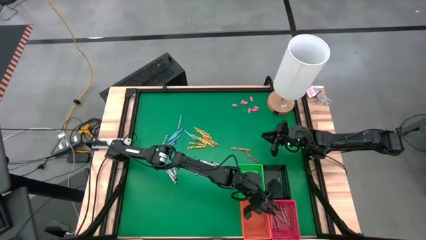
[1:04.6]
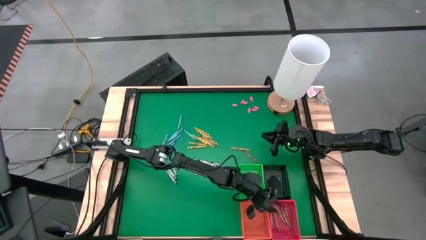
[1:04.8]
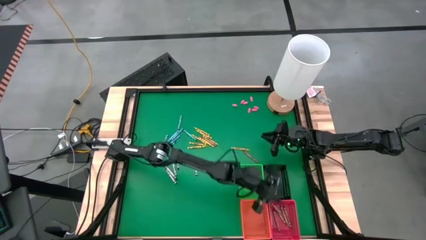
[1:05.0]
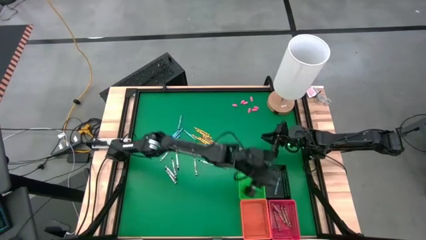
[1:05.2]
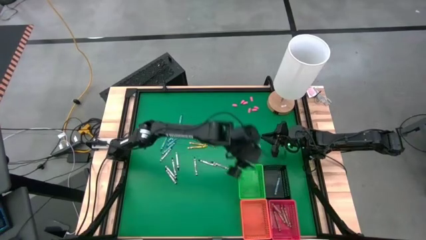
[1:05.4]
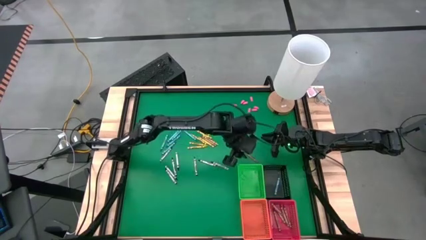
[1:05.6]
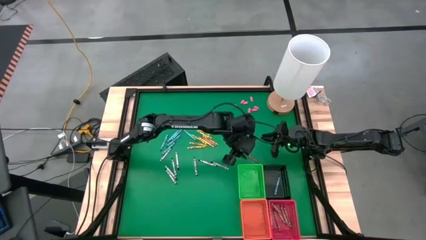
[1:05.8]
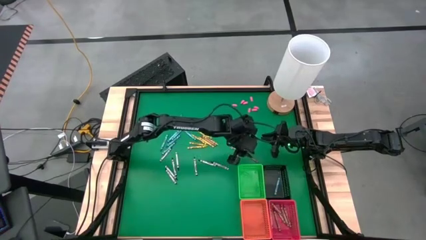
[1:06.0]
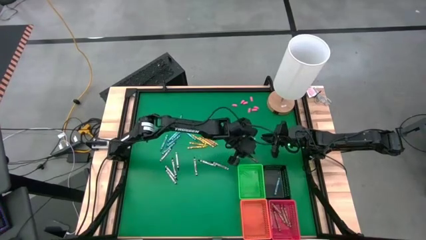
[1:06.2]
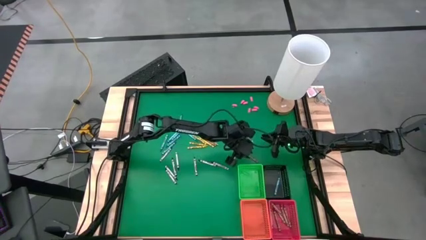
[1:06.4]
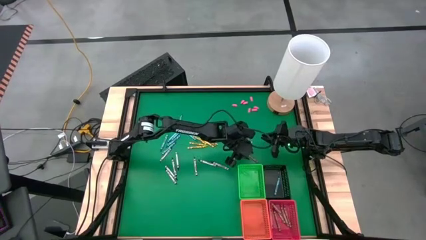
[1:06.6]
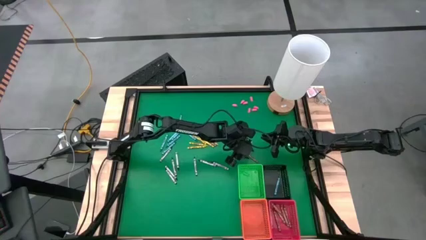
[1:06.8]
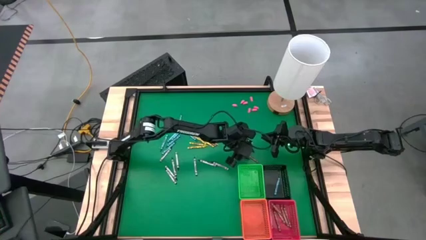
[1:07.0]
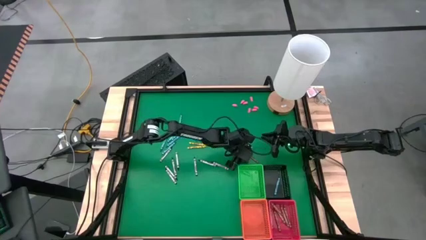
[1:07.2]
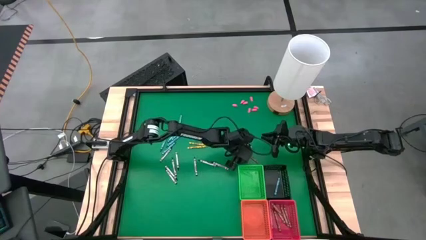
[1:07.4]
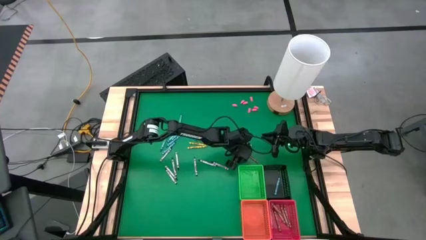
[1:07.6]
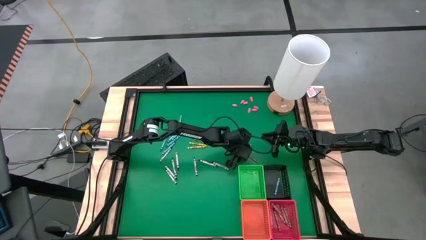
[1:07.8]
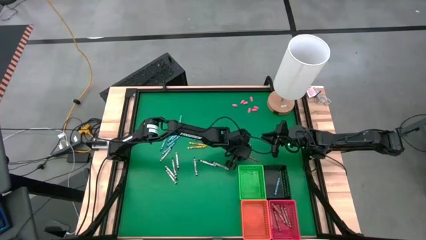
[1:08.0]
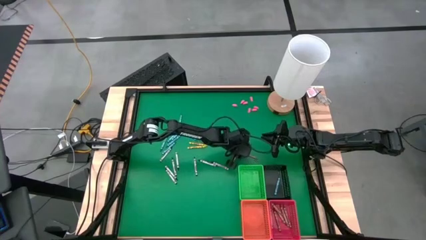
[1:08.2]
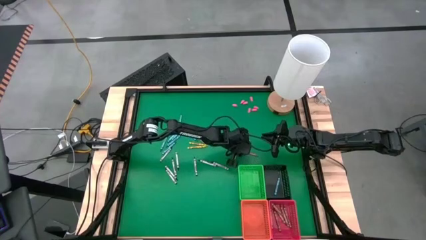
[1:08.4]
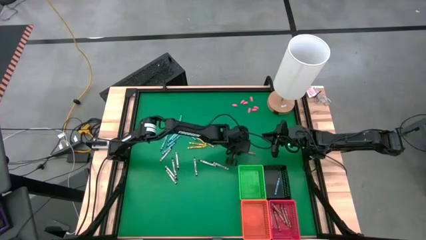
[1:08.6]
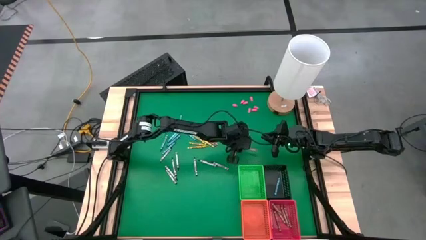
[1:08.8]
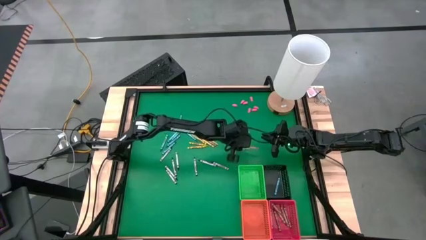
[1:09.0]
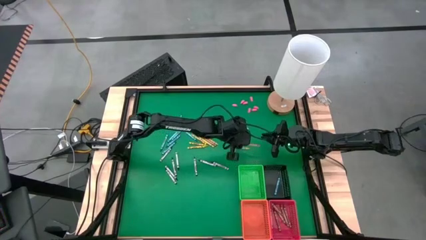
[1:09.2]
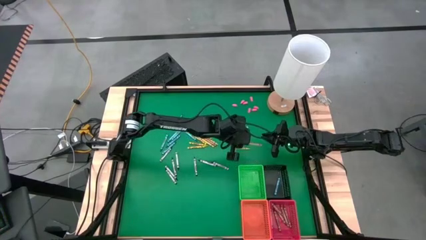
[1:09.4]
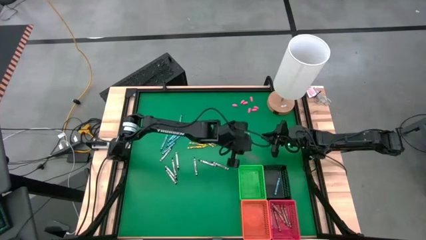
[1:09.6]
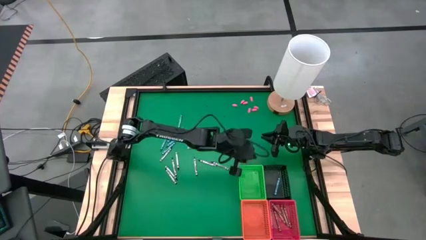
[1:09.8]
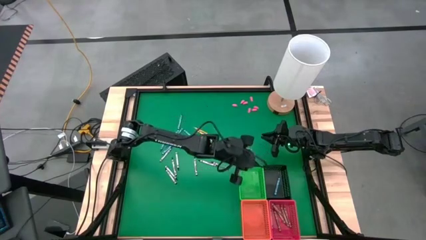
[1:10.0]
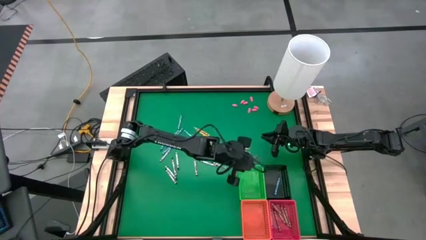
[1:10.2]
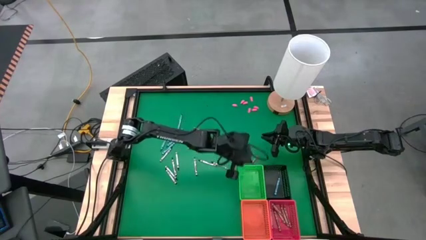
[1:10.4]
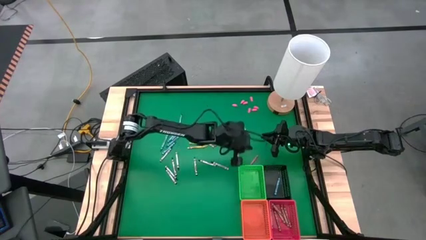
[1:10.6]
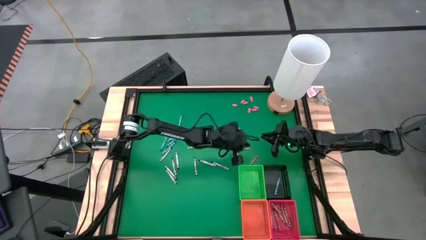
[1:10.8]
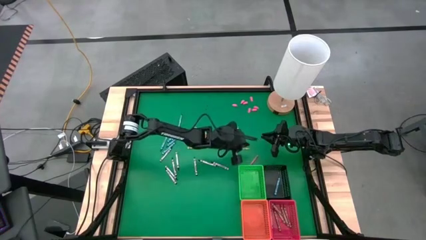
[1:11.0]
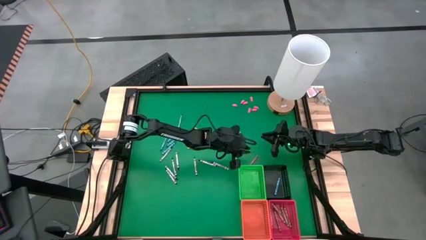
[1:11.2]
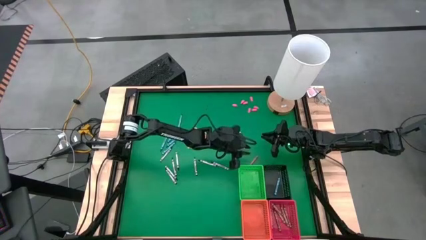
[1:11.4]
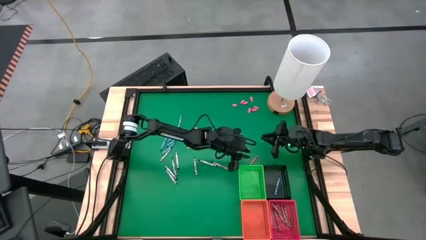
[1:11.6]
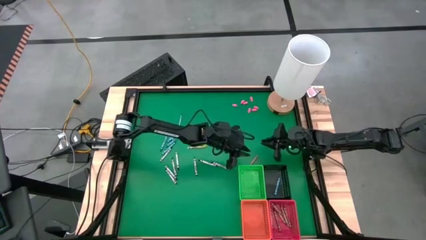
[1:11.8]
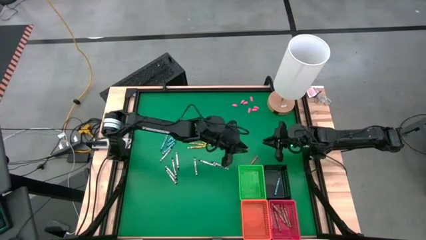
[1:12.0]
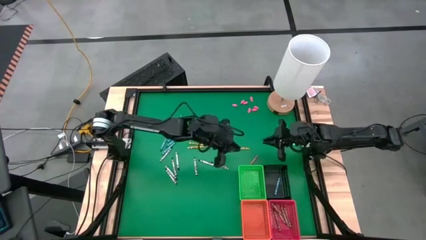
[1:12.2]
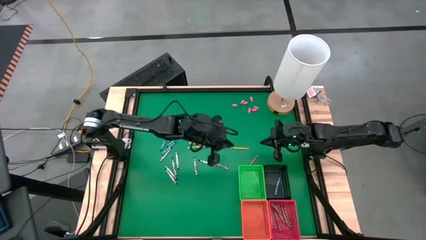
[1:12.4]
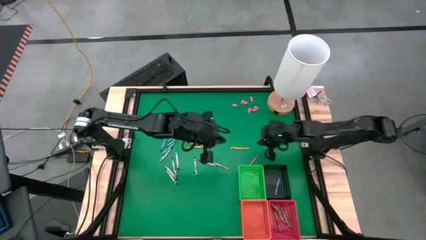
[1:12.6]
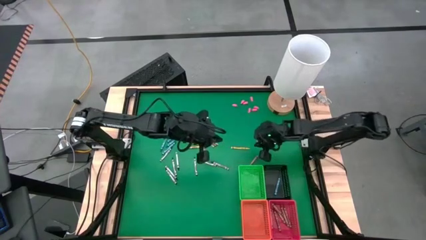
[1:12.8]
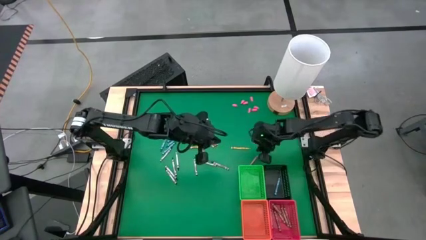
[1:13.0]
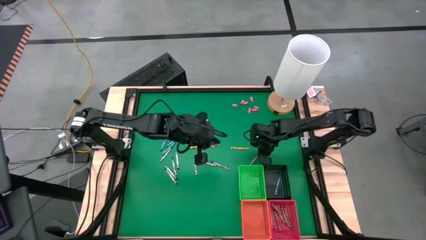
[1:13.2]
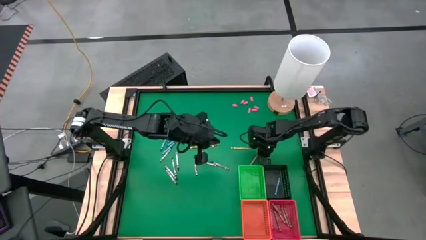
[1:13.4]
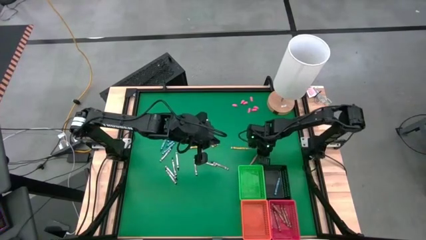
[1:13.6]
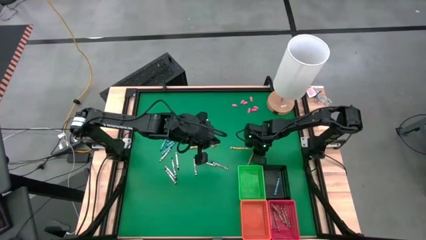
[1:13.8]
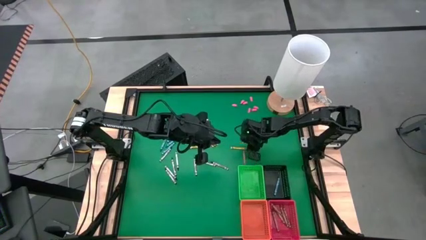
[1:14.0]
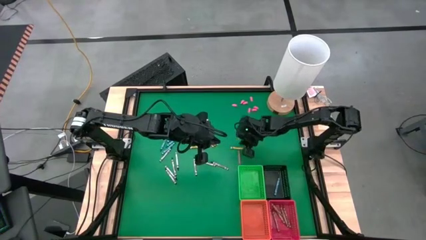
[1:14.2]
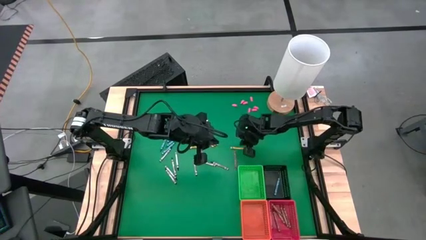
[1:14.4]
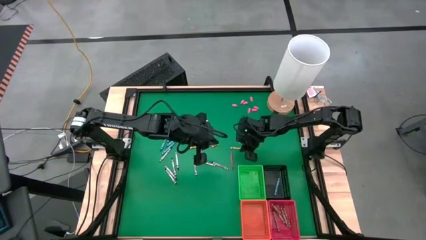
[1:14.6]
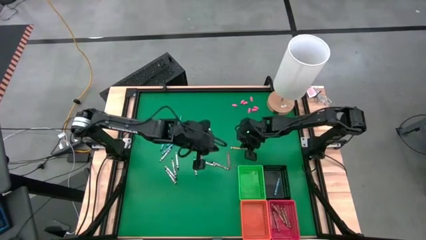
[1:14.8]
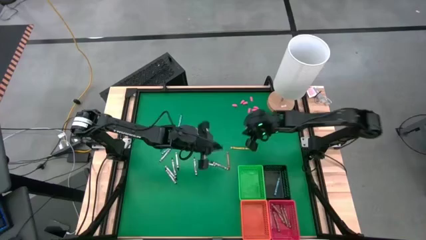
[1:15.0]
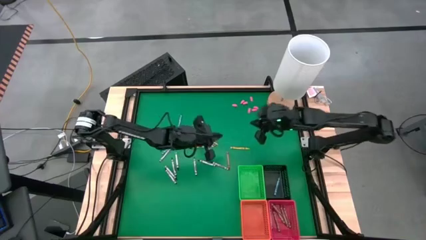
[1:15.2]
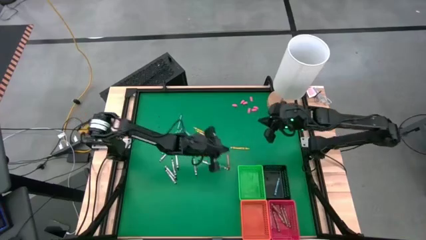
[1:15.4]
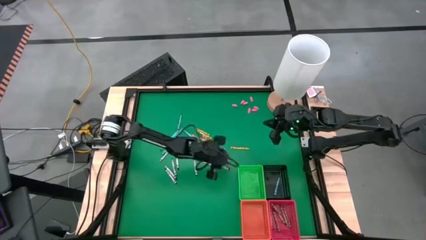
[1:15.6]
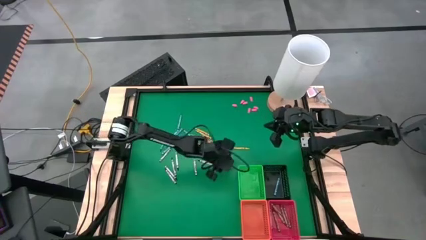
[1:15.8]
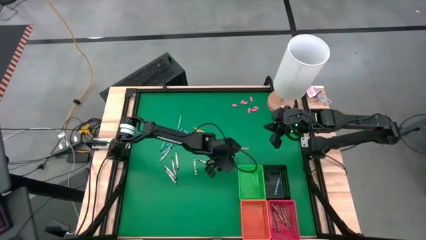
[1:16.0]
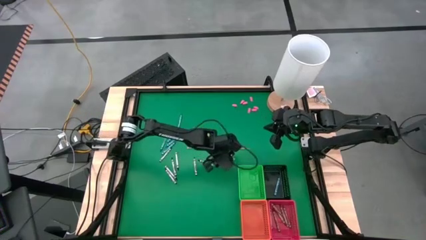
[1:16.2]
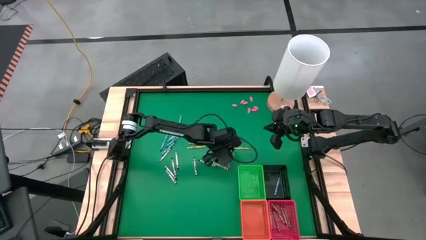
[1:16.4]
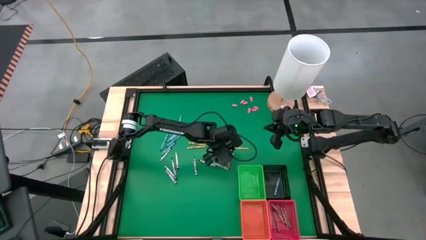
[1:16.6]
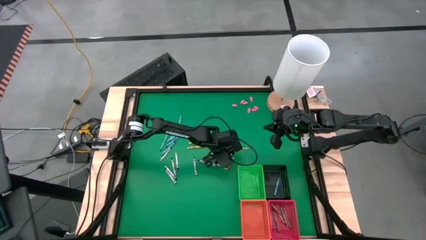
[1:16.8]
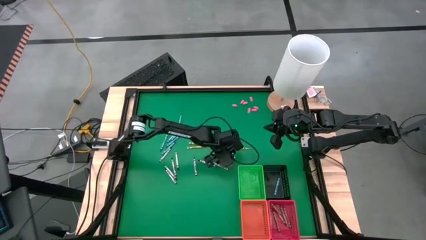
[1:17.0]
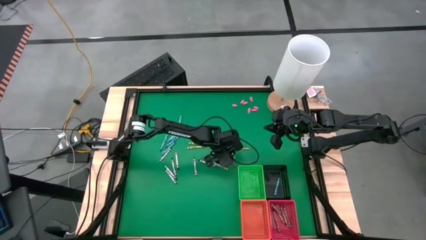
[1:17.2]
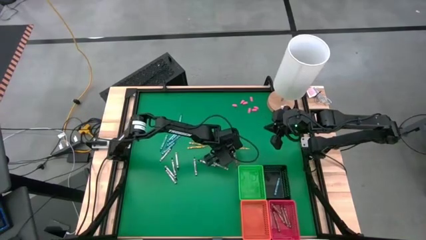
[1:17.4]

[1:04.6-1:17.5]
Task: Sort crayons
Put the brown crayon into the red bin

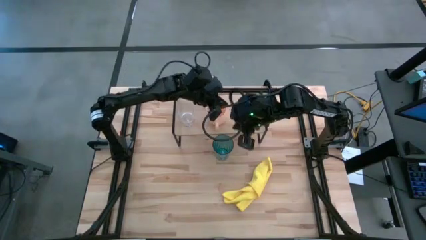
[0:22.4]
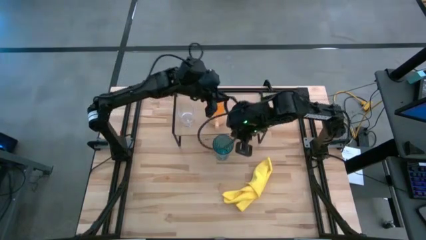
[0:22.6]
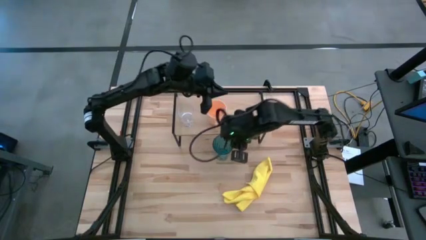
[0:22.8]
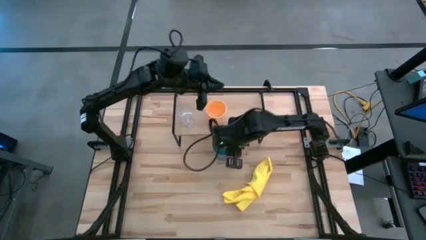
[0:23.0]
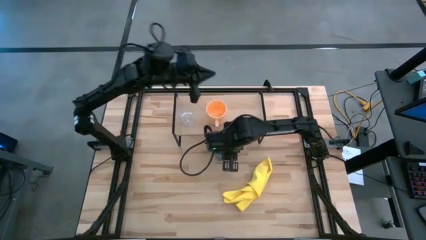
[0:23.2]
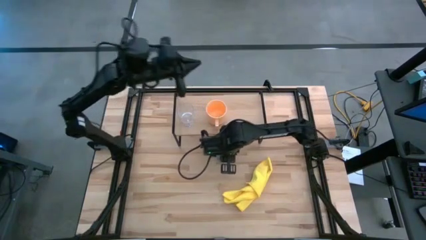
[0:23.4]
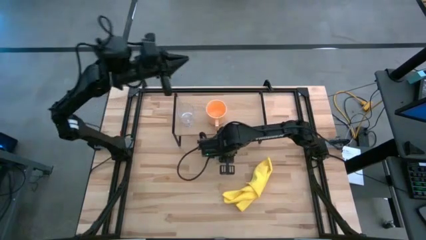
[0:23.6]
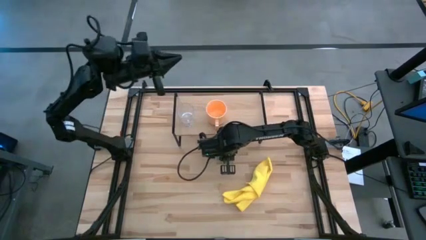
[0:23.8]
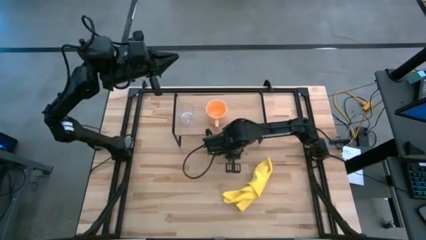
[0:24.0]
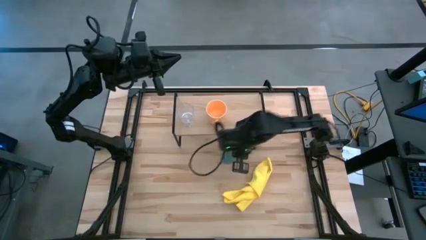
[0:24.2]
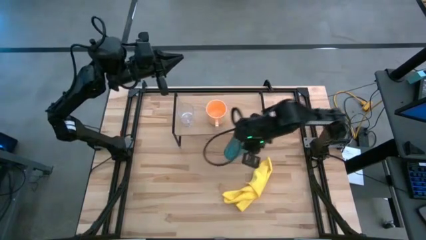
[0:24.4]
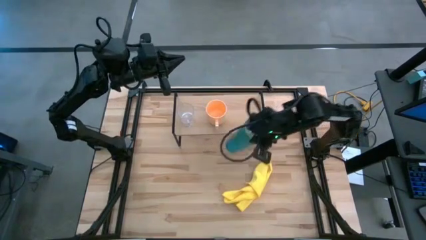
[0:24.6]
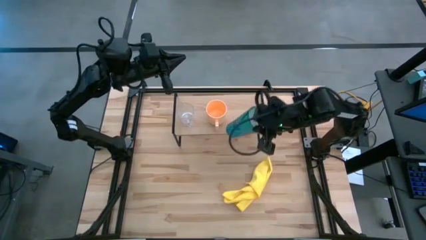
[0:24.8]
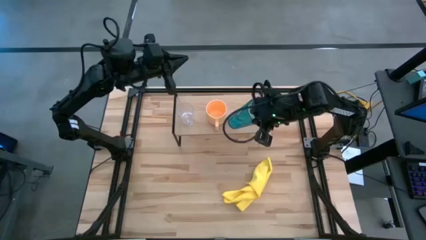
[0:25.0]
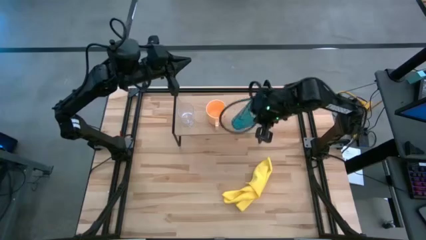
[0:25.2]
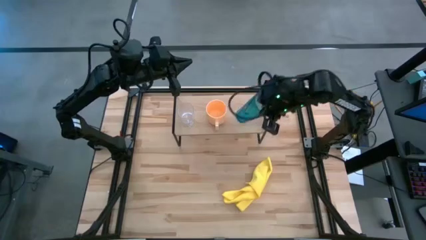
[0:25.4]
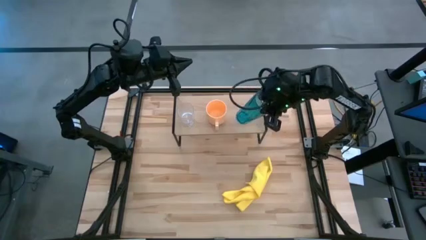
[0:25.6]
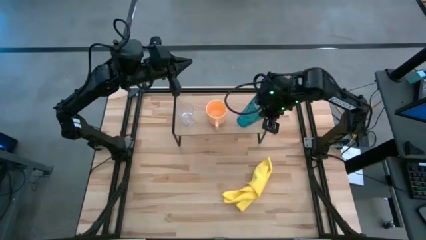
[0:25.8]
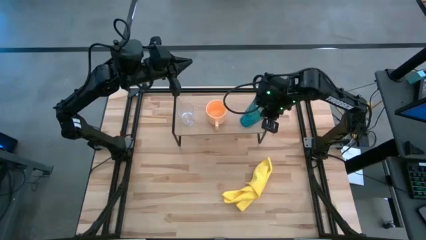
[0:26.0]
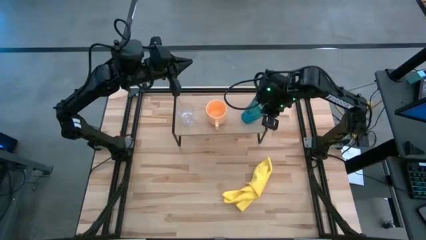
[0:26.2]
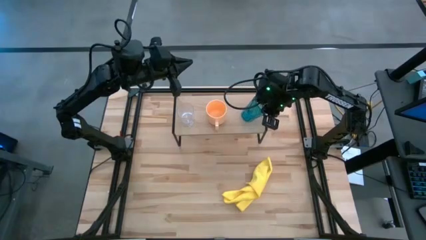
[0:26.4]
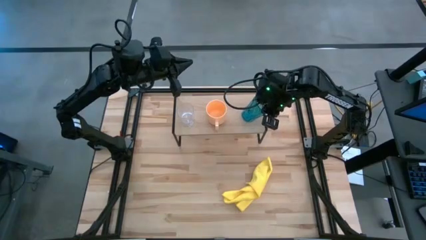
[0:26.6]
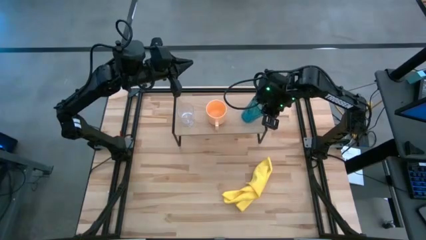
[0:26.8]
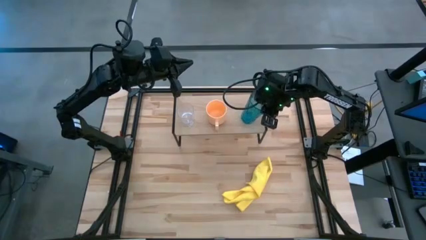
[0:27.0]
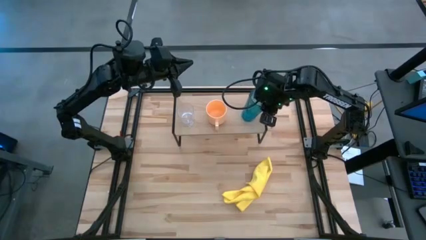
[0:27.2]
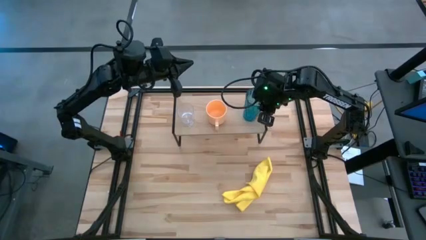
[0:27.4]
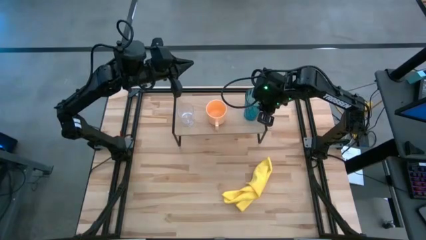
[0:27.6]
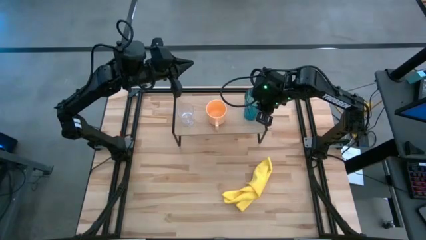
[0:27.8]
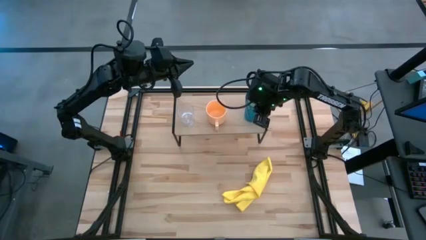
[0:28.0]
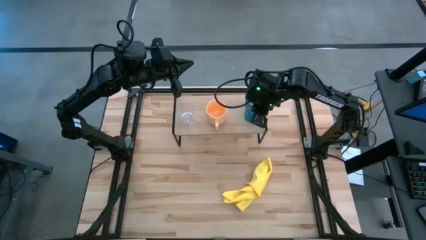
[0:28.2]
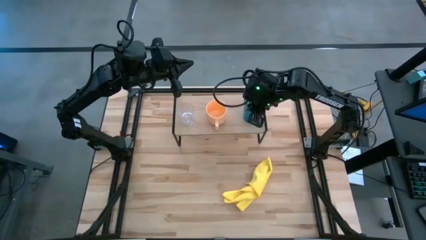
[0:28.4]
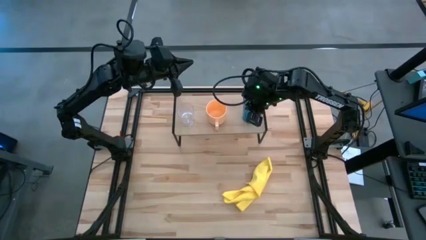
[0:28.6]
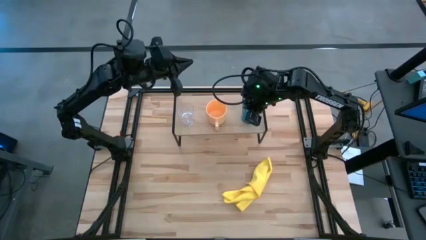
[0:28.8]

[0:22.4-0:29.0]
Task: Stack small to large cups/mugs on shelf
Put the blue glass on the shelf
